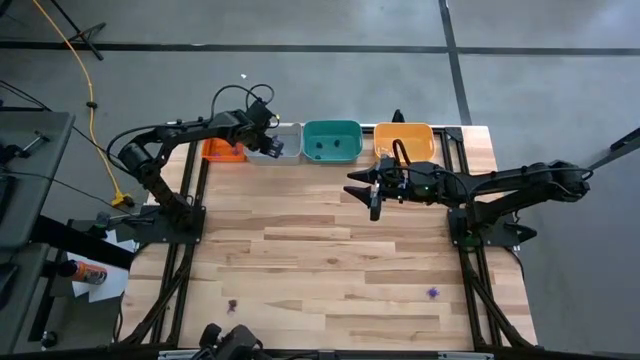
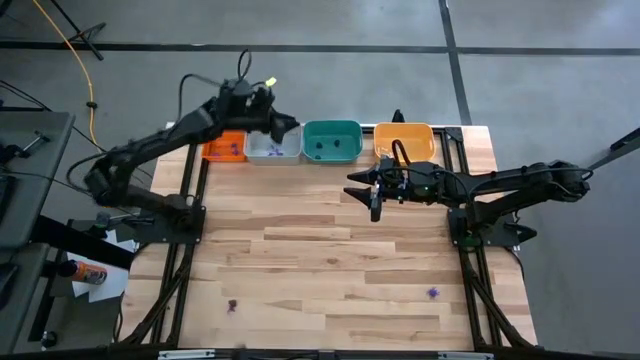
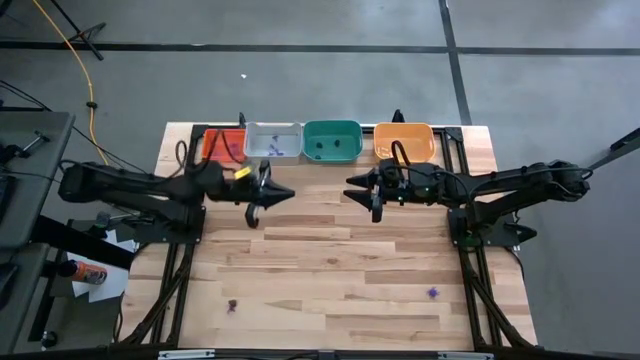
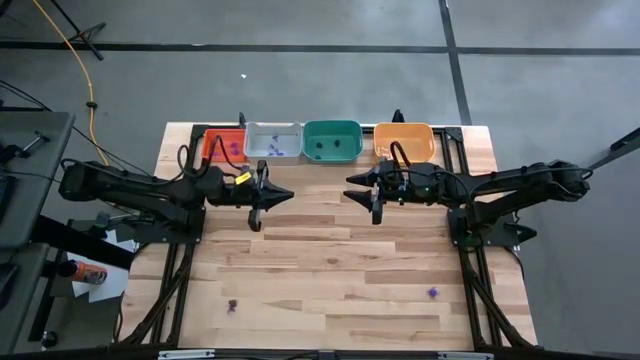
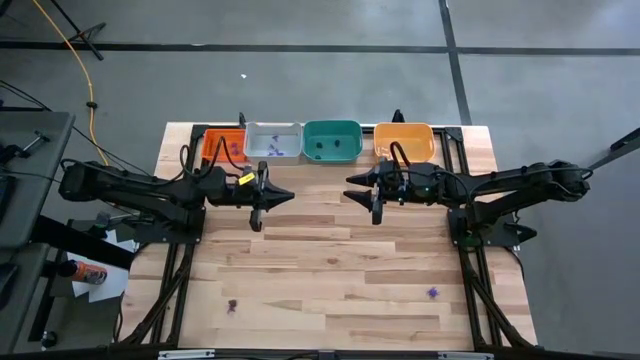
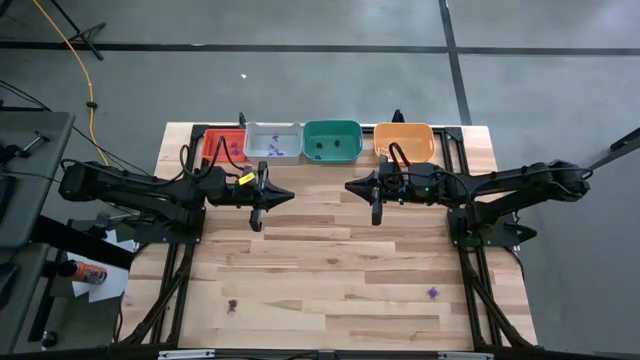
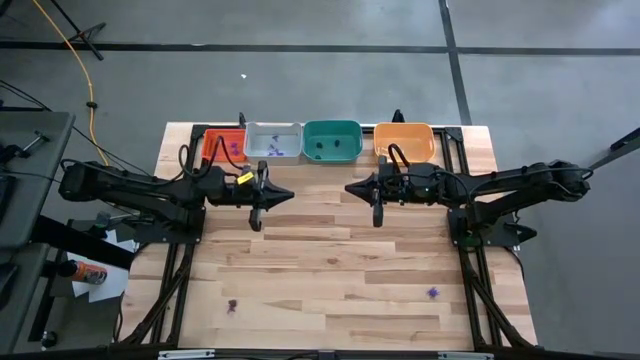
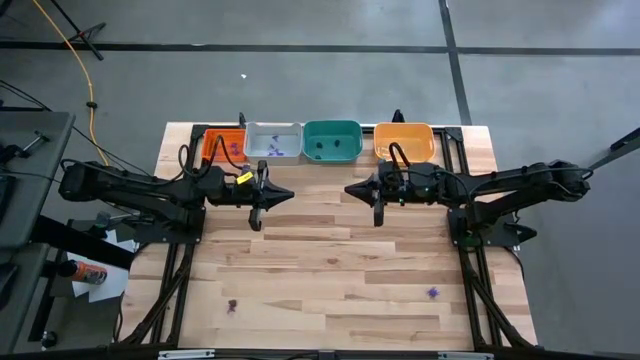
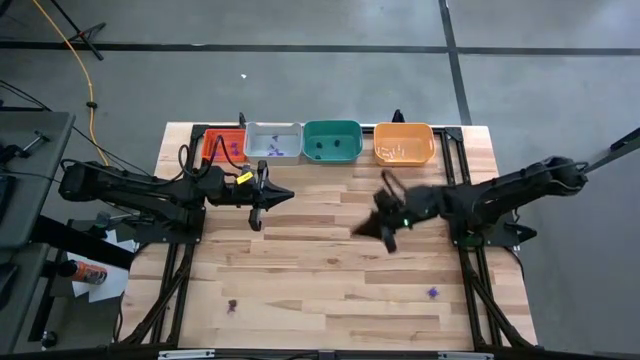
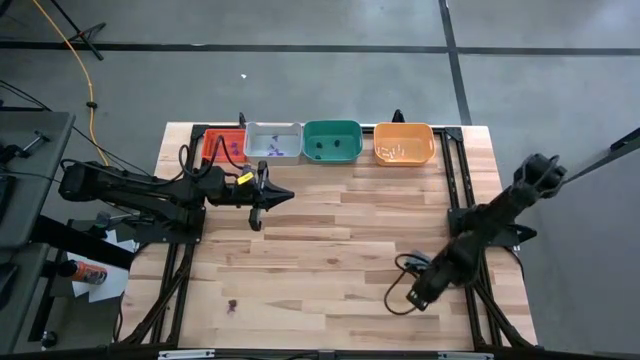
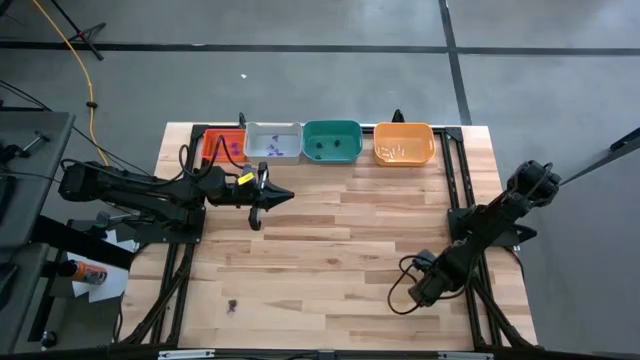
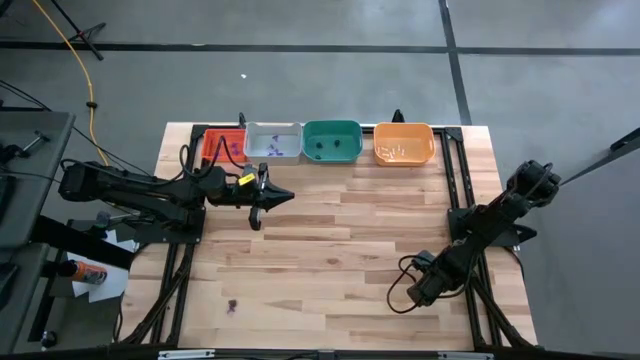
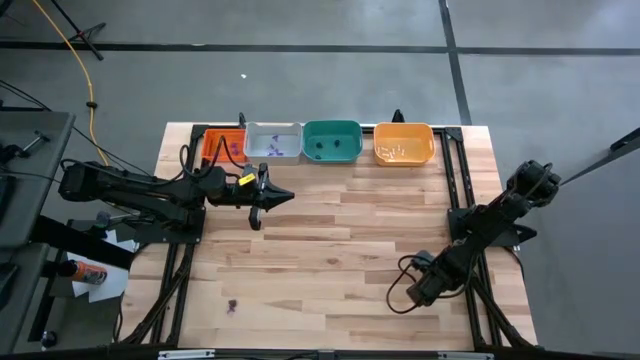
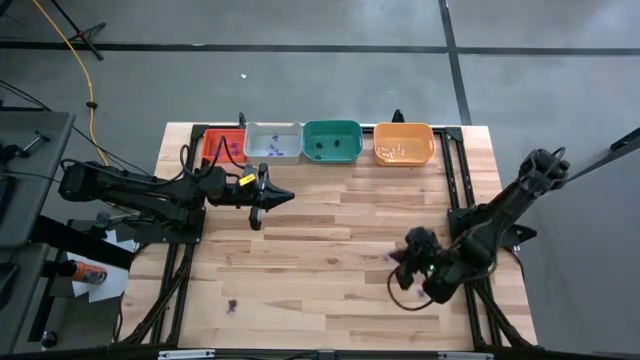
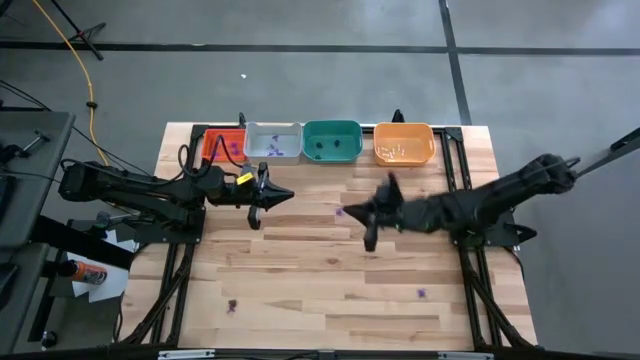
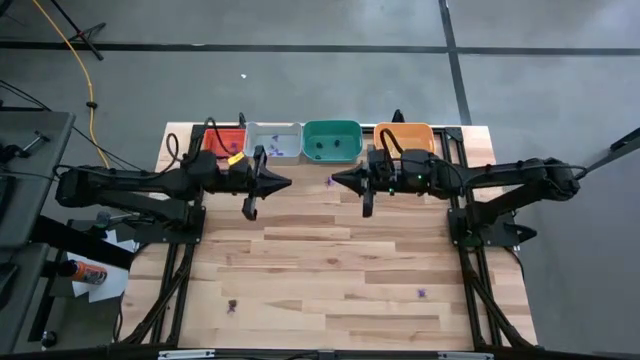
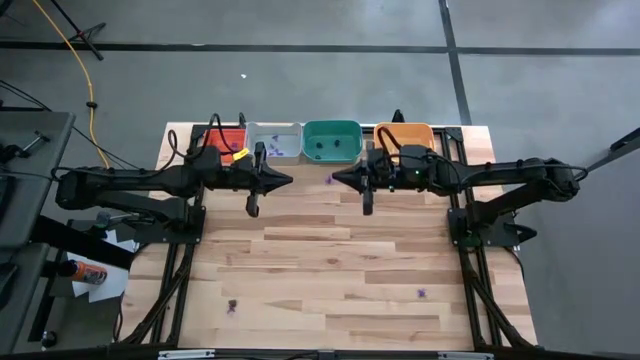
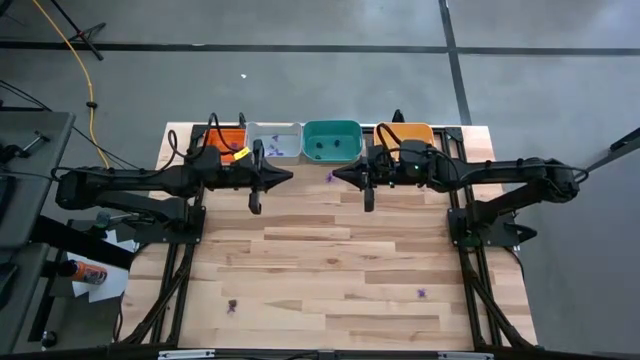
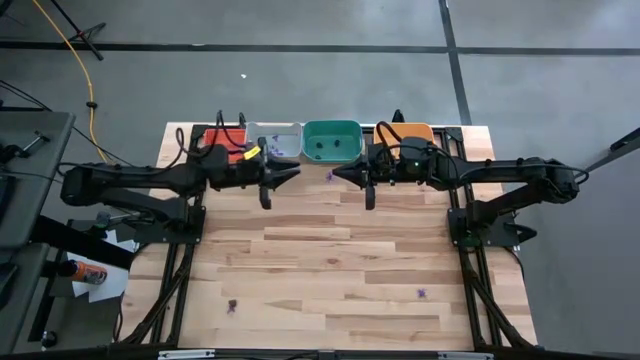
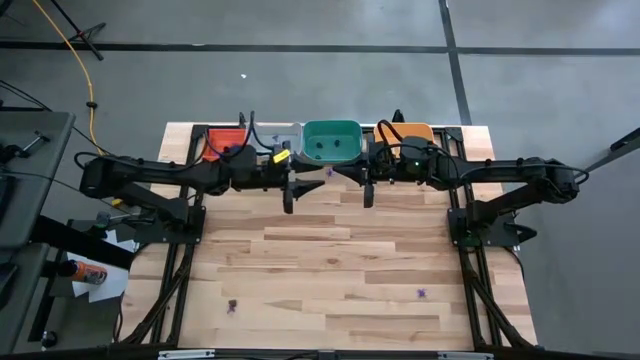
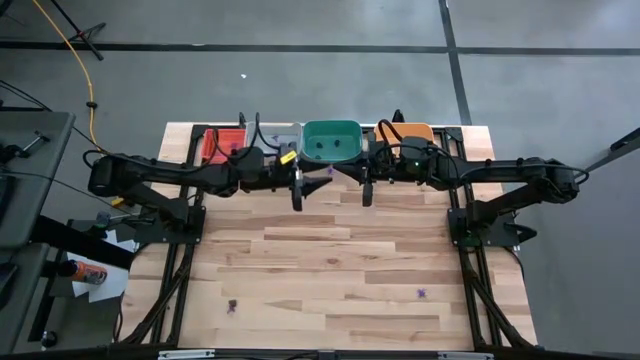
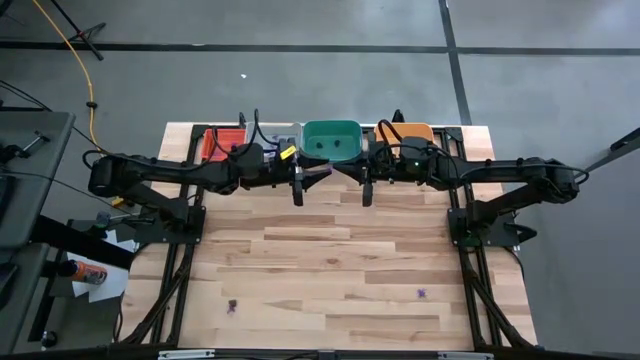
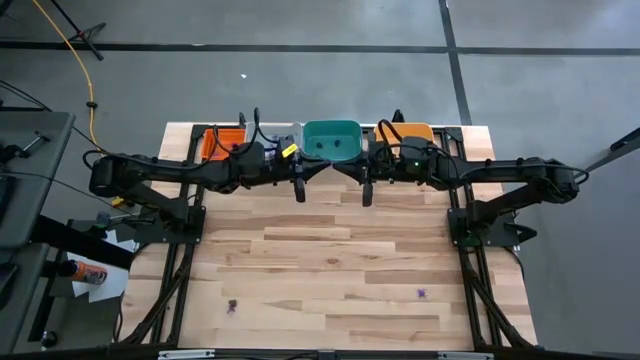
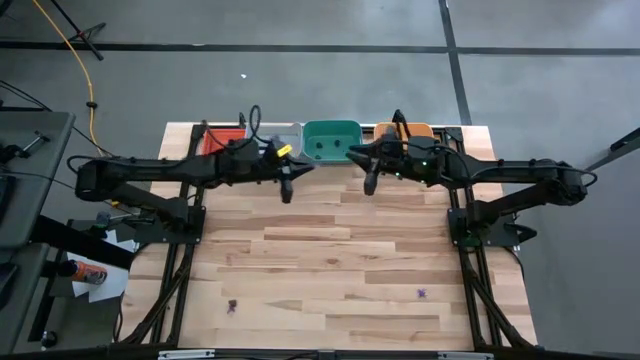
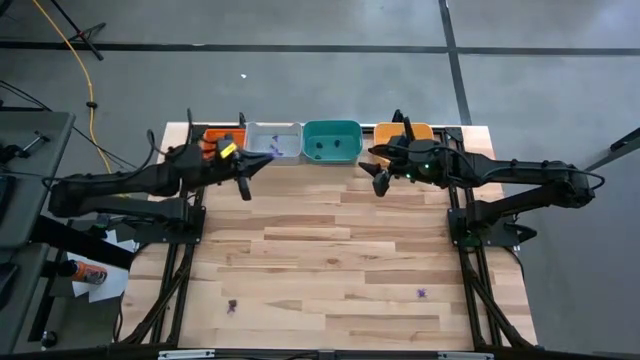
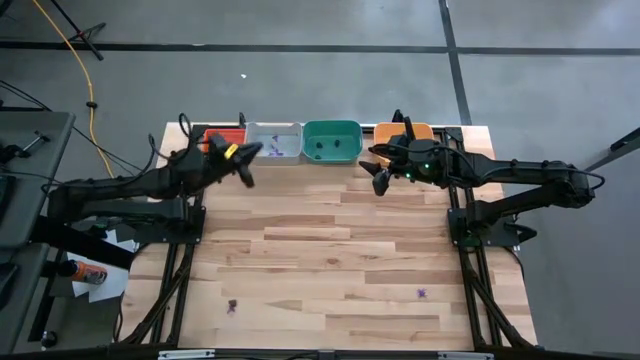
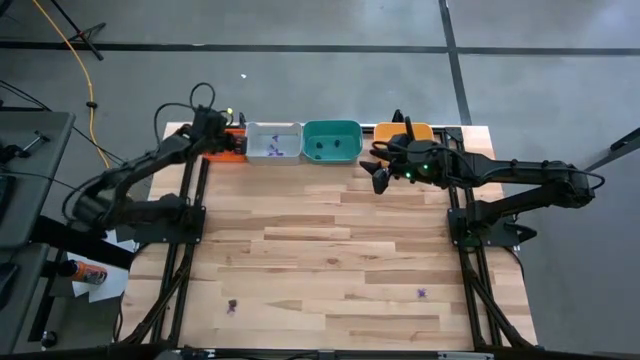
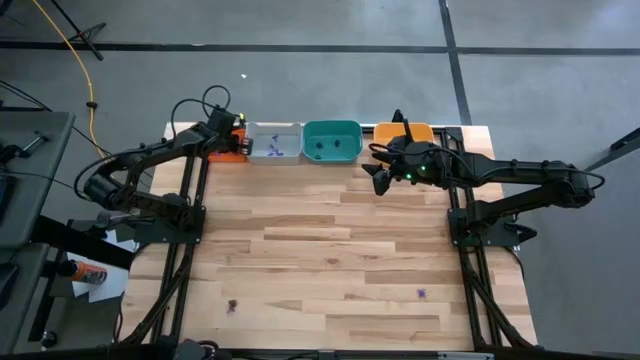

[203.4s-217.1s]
Task: Sort Halloween decoration
Put the violet spider into the orange bin

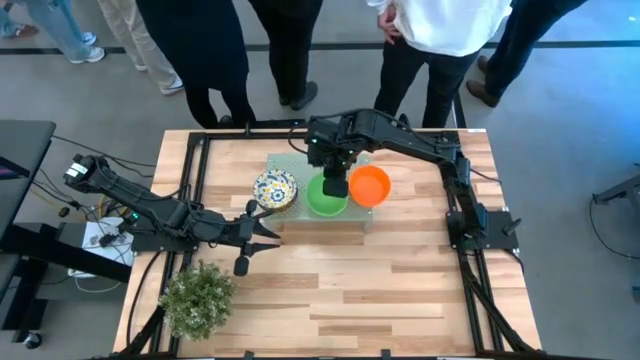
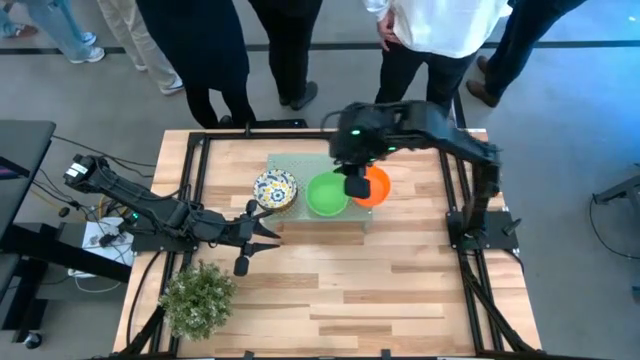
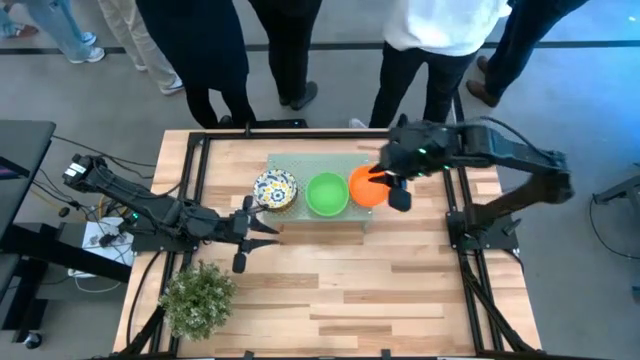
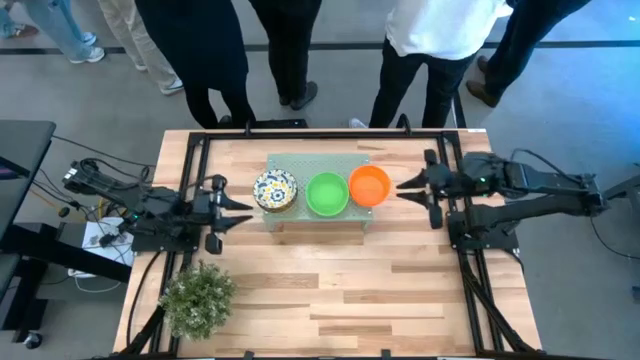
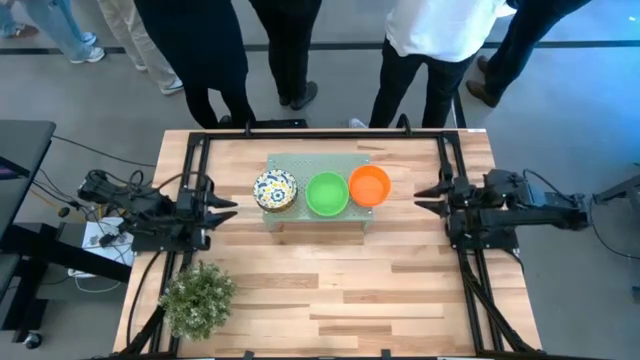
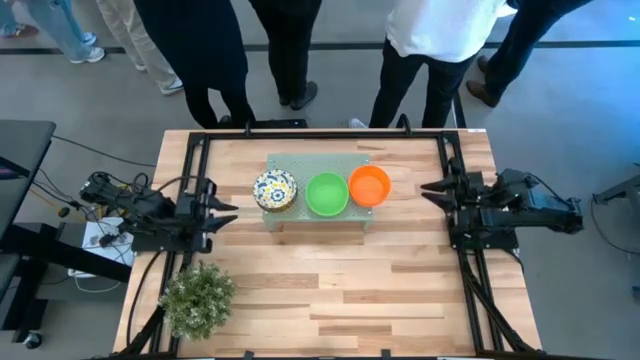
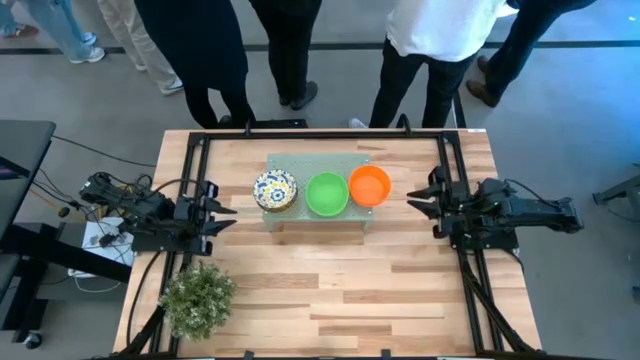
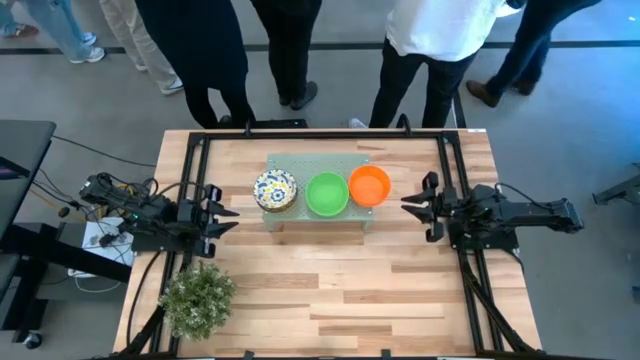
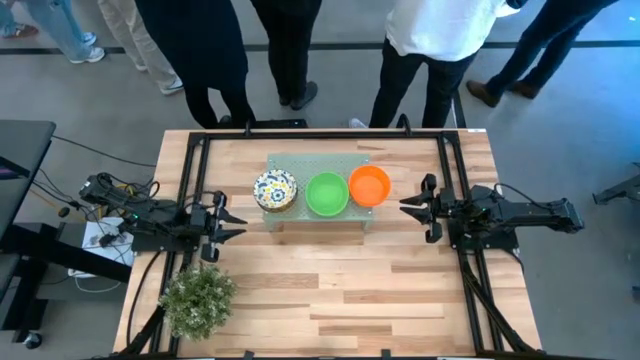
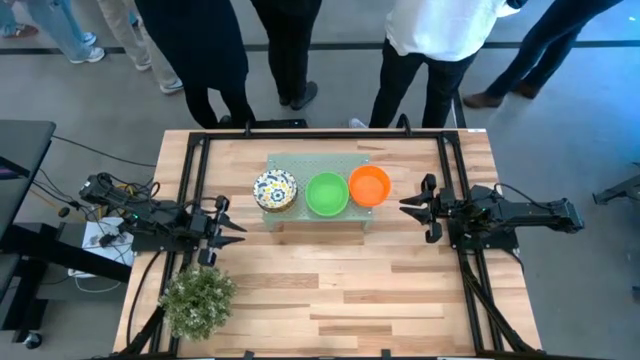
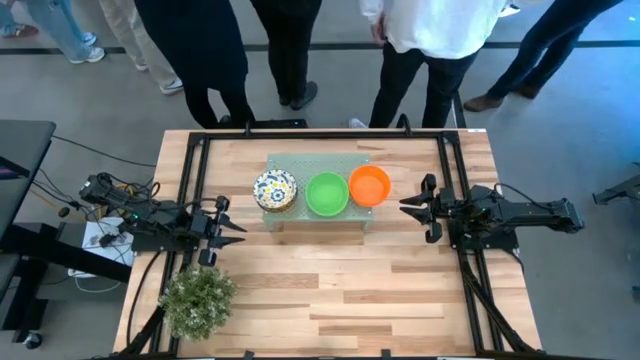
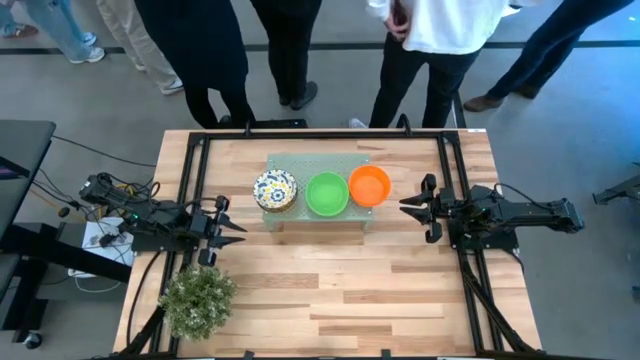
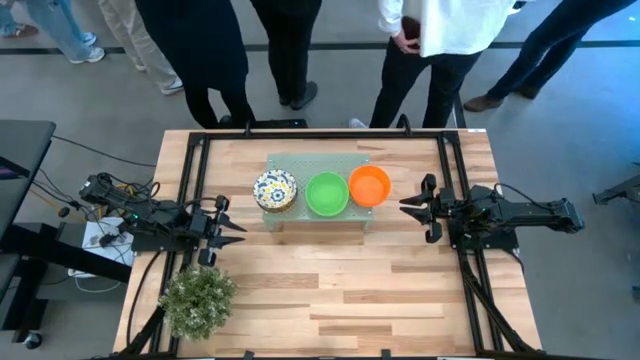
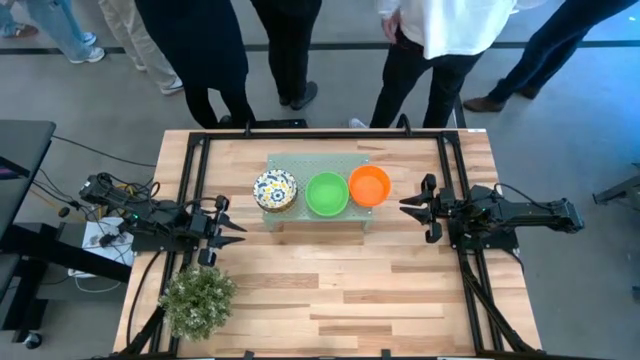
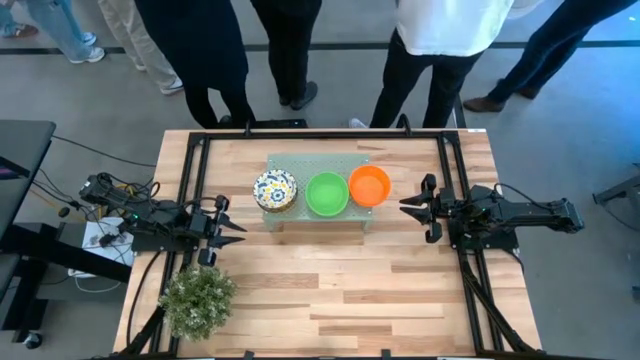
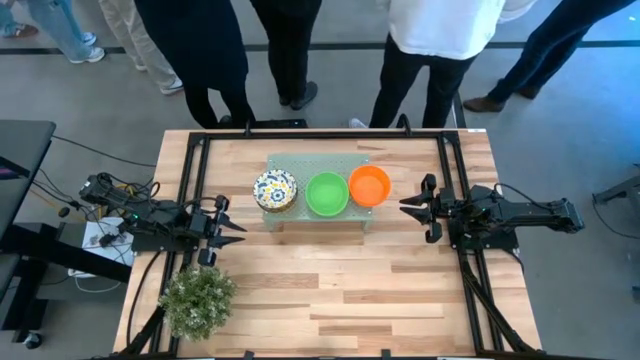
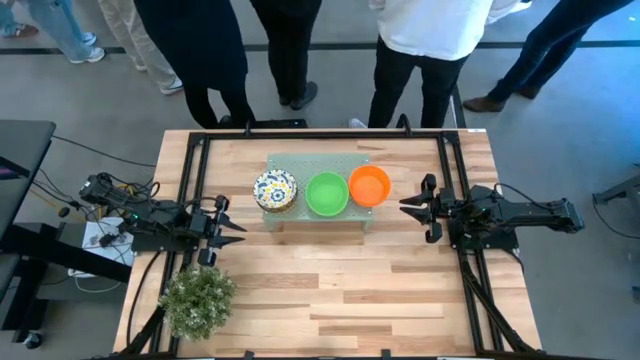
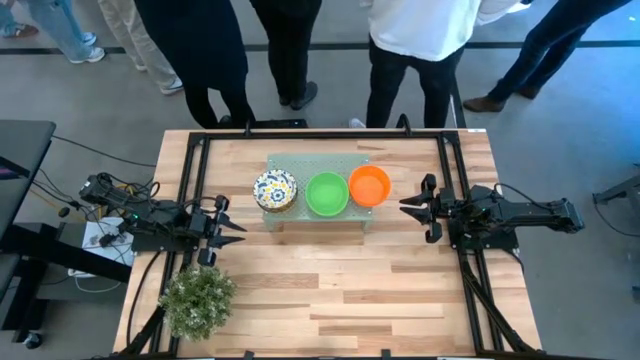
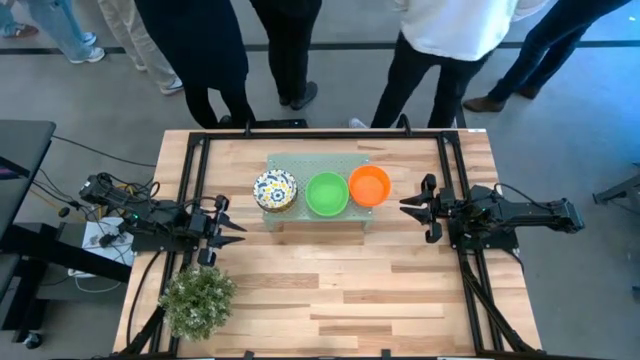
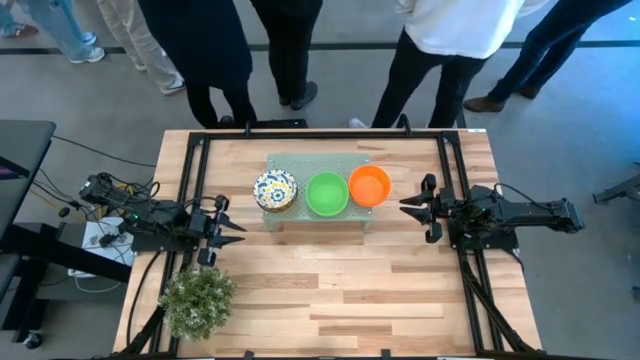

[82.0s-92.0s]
Task: Pick & Place Mini bowls
Return to Home Position
